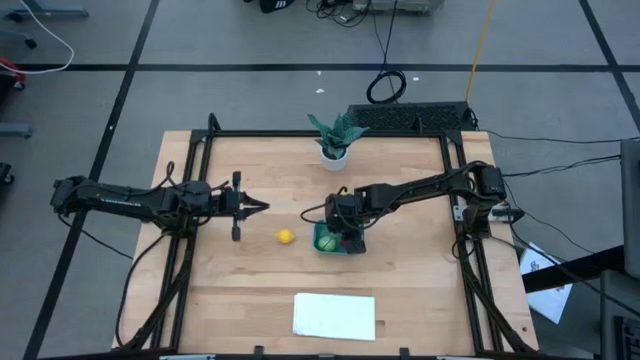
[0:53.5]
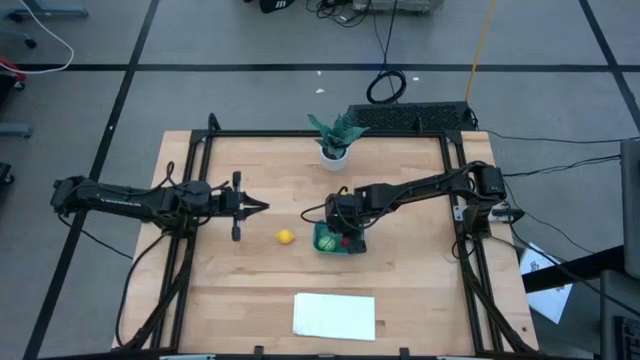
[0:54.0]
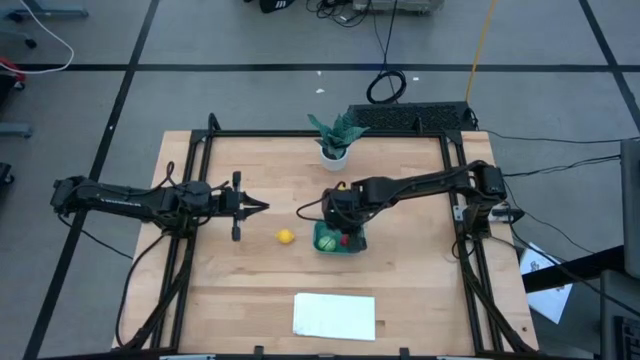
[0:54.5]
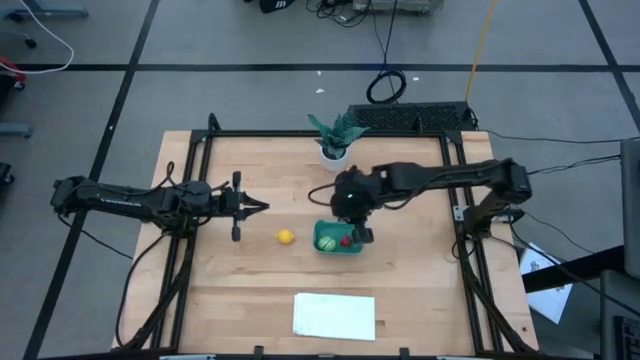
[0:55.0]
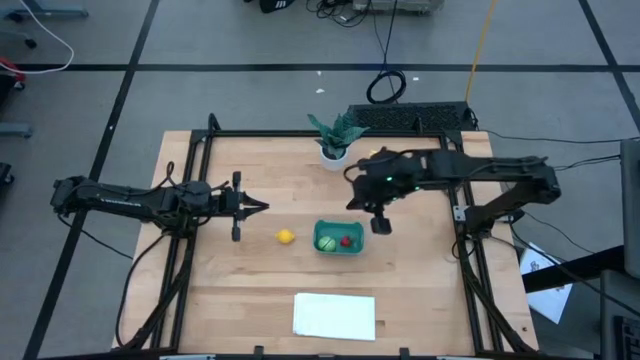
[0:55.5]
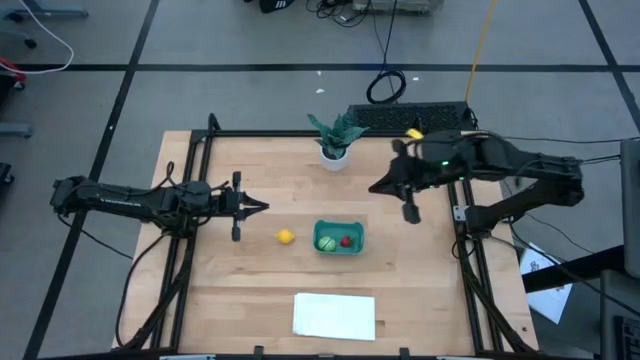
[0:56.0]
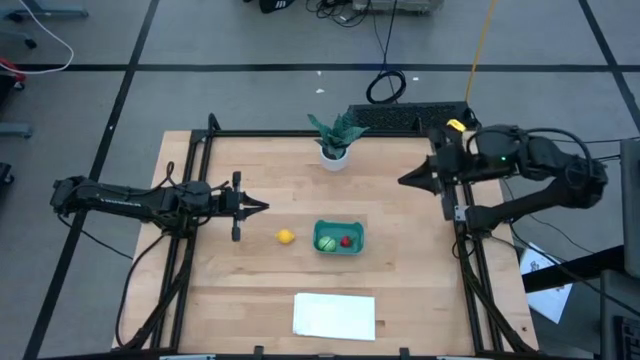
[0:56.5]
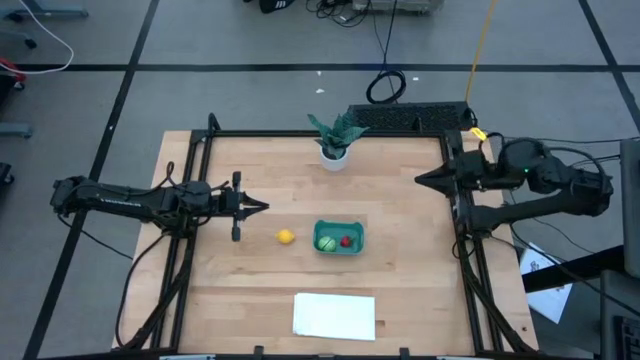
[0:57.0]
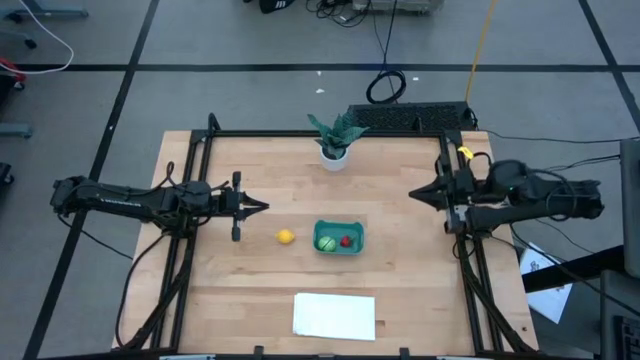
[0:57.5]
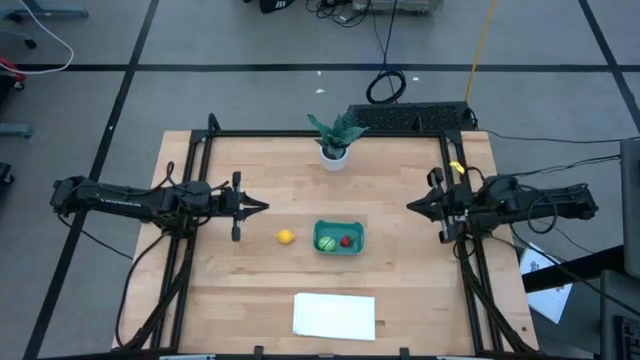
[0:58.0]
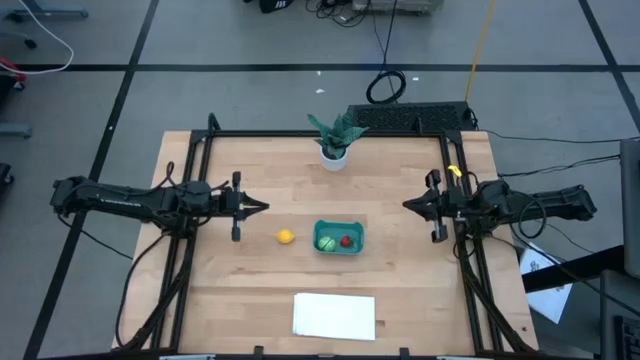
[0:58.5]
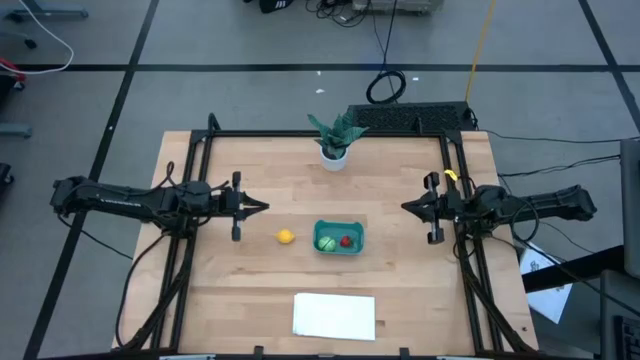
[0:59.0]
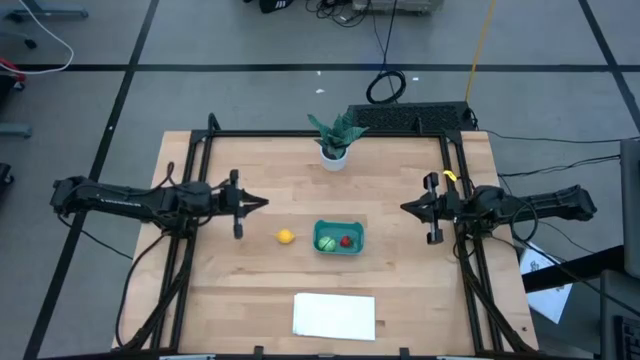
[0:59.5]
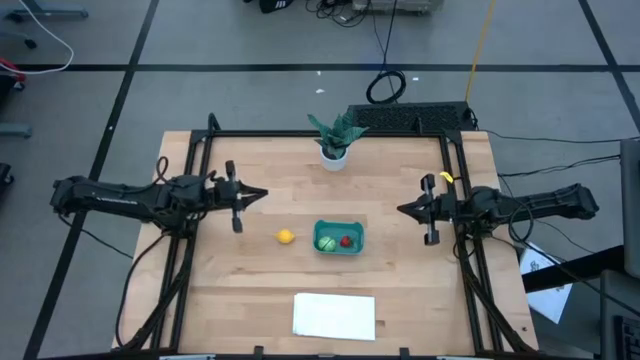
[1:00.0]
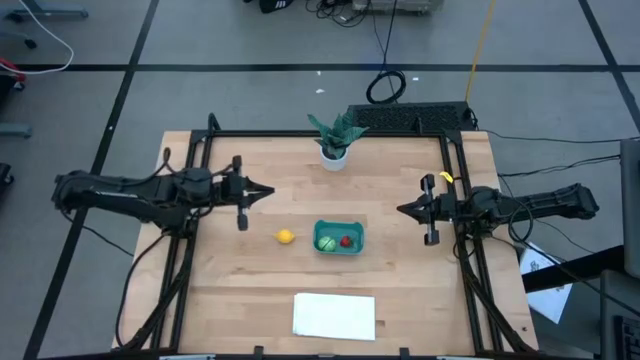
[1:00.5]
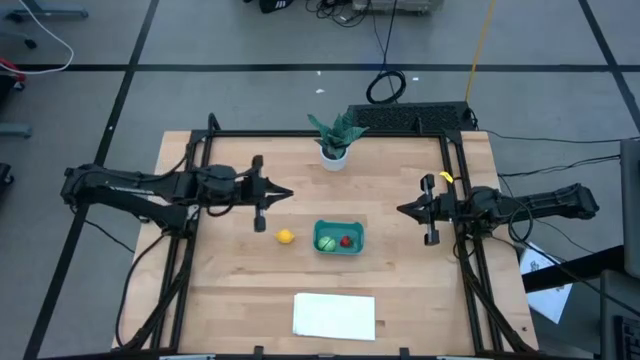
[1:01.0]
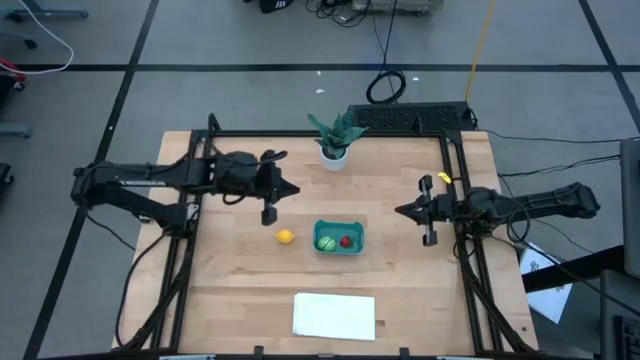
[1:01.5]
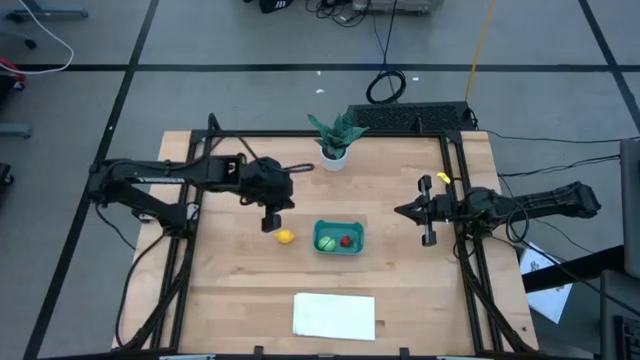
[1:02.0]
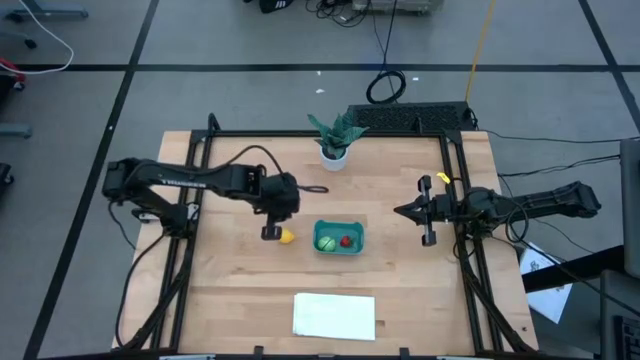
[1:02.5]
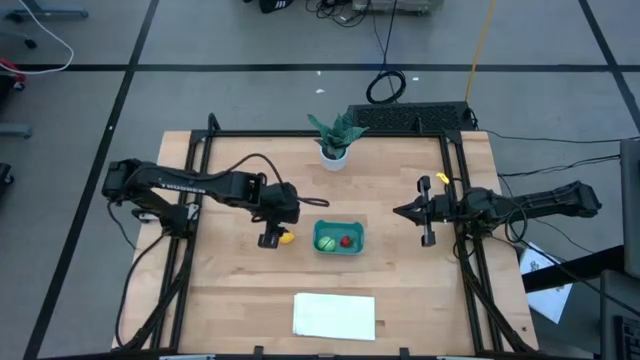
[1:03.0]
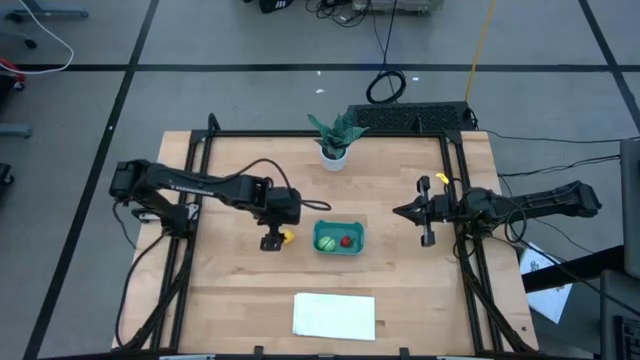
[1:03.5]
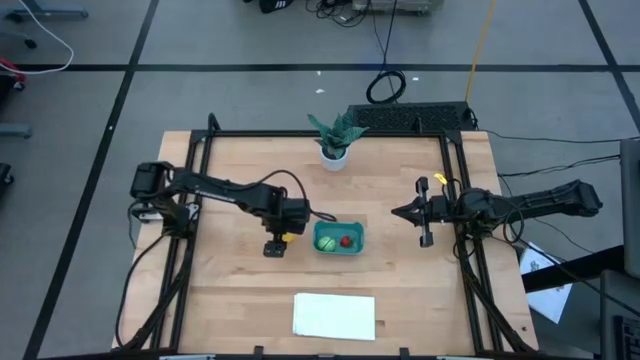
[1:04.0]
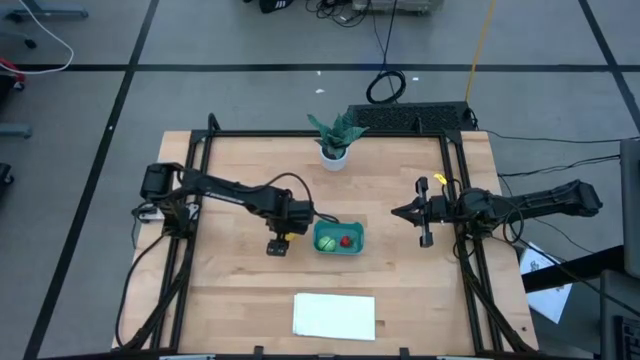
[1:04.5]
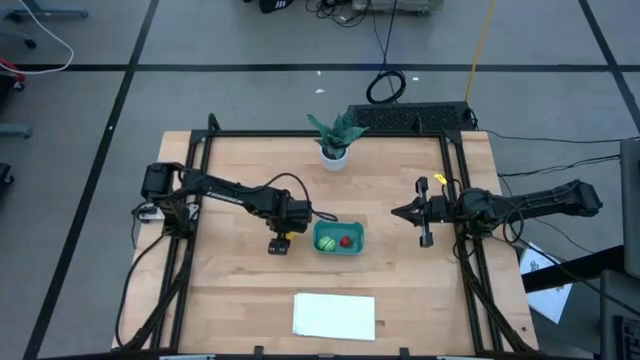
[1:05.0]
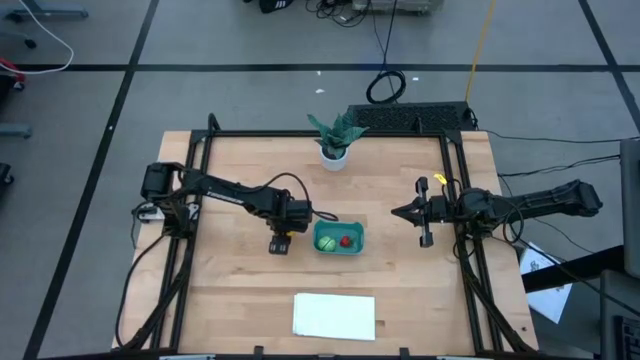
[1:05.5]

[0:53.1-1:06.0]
Task: Pick and placing Produce into tupperware
Put the lemon into the green bin

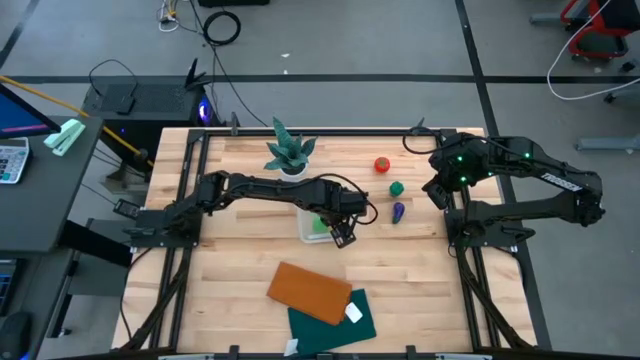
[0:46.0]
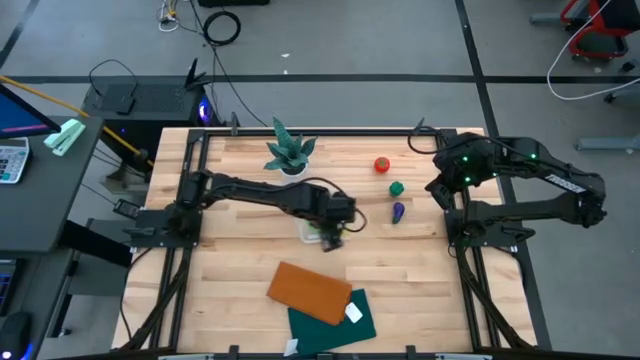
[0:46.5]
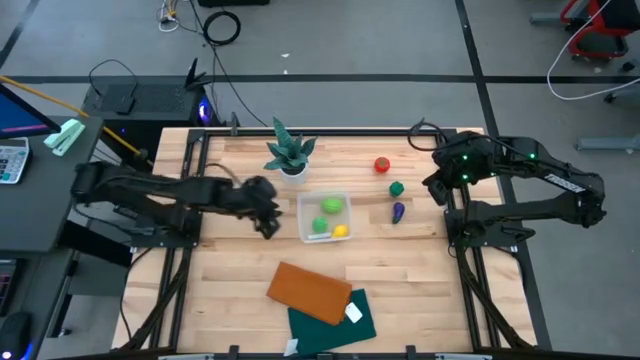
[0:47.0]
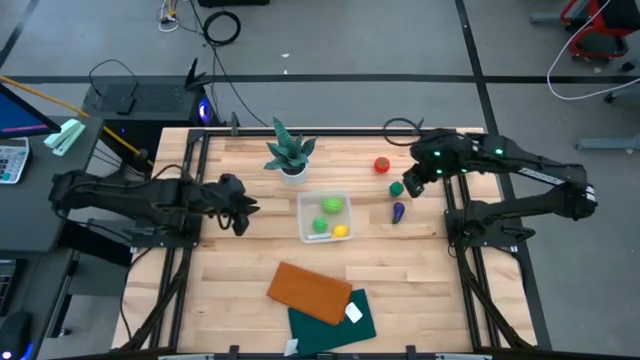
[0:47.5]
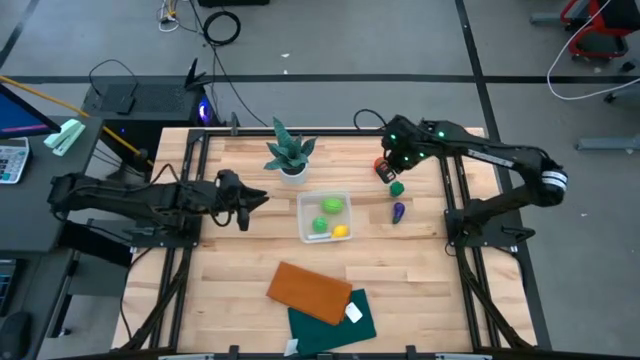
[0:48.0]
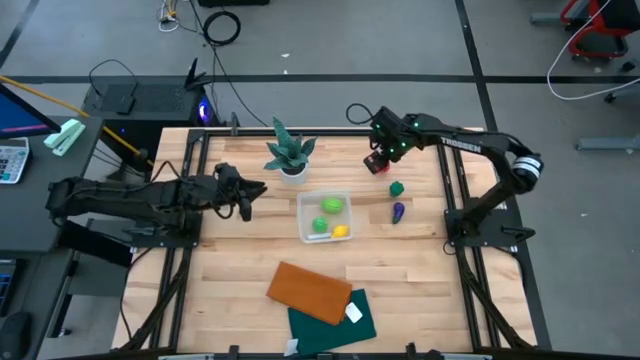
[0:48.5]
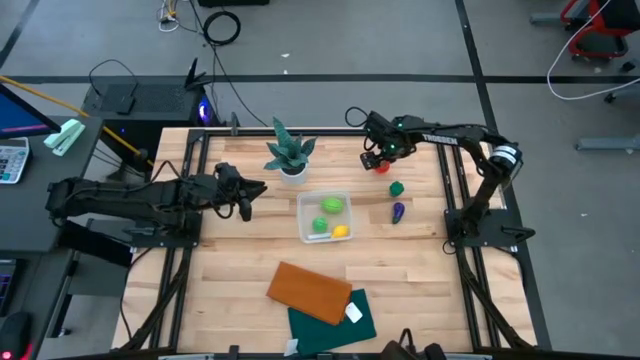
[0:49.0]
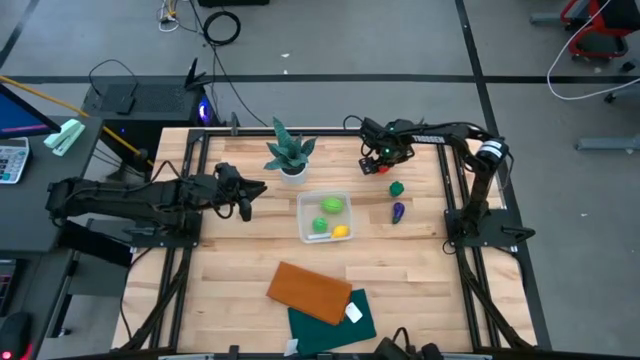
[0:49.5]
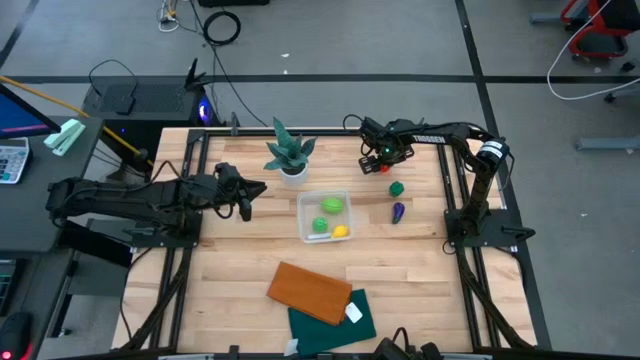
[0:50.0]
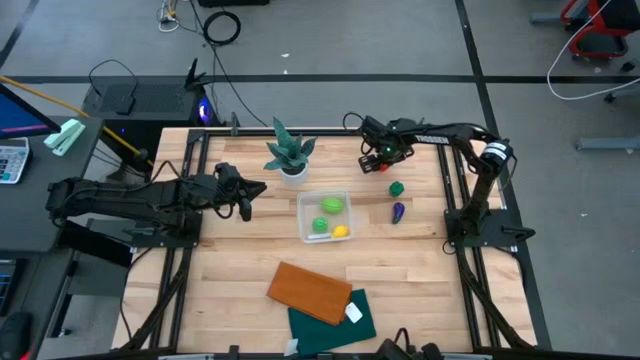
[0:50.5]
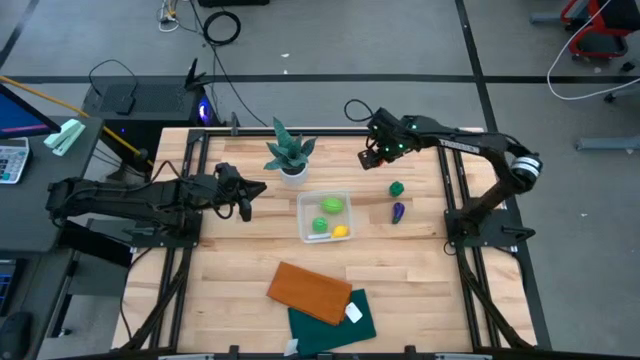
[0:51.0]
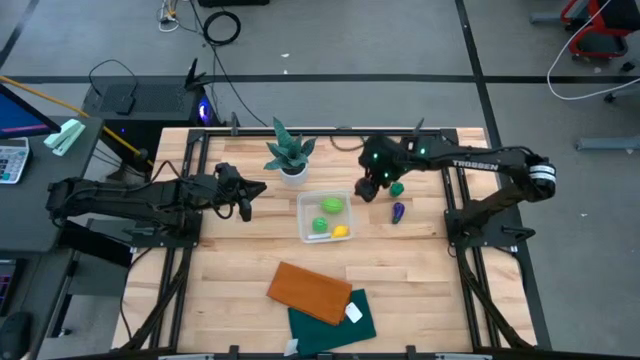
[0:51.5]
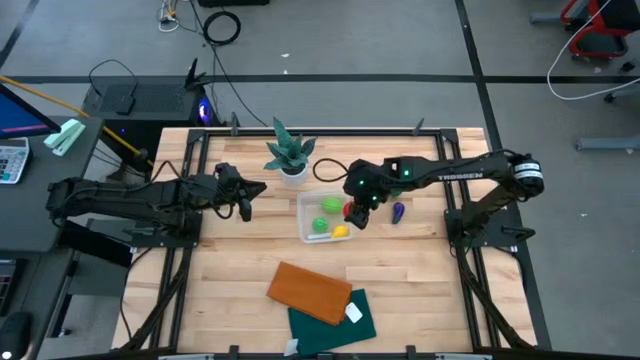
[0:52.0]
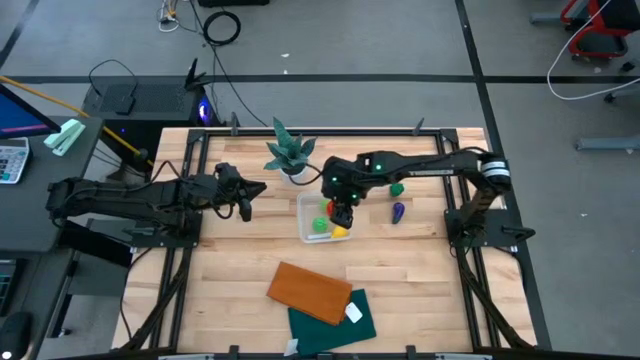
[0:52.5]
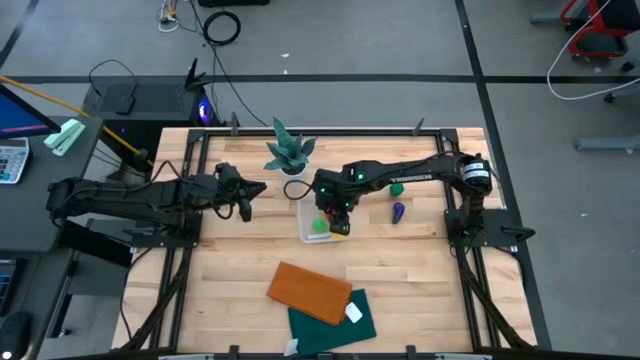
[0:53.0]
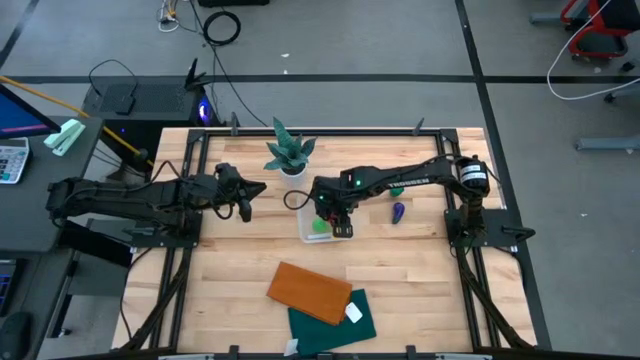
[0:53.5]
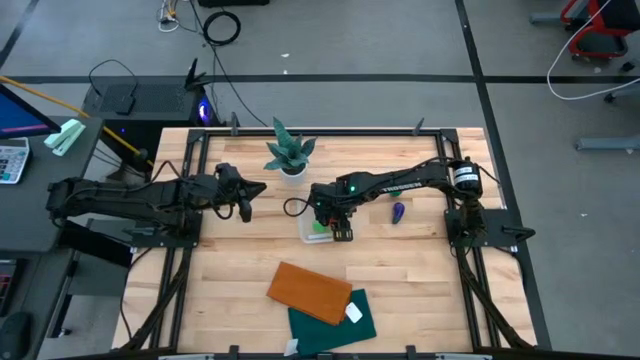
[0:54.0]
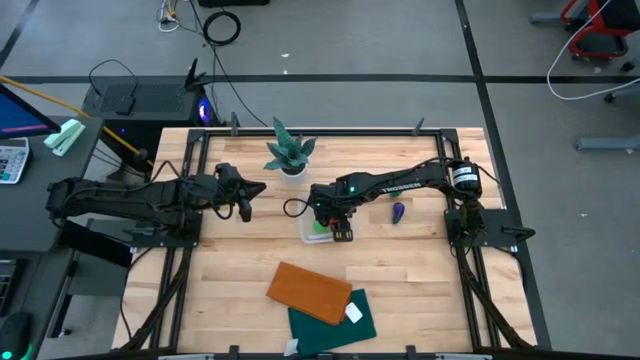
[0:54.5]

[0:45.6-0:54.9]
Task: Pick and placing Produce into tupperware
Put the tomato into the transparent bin
